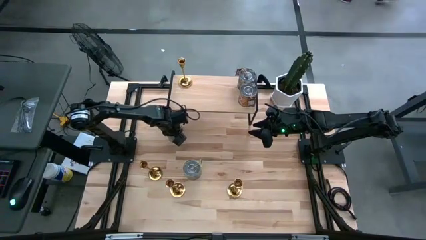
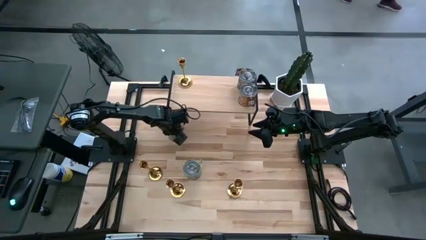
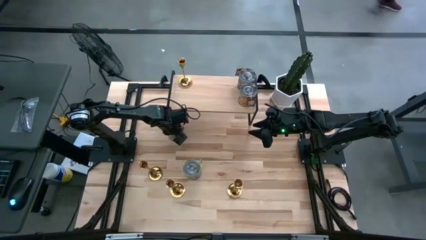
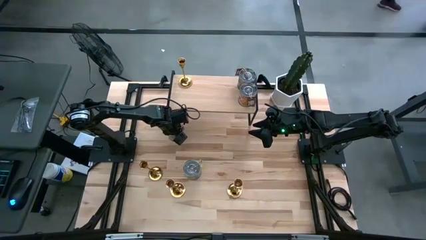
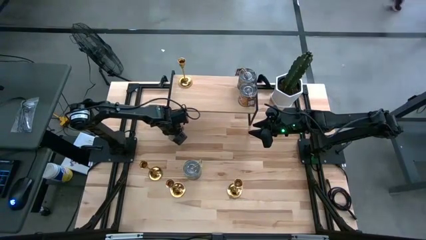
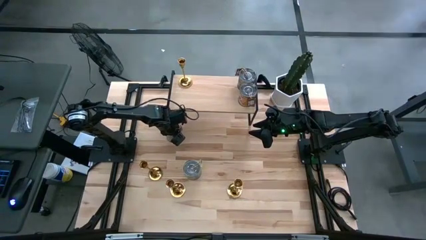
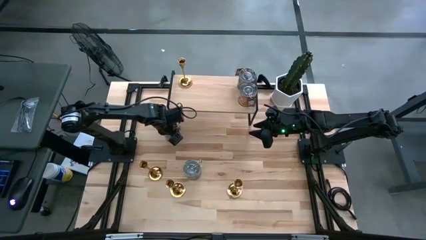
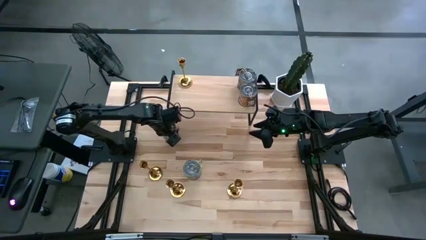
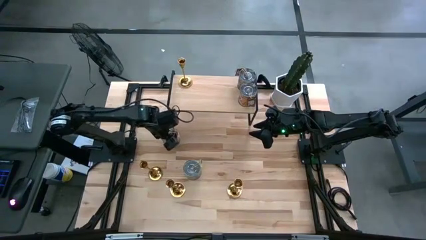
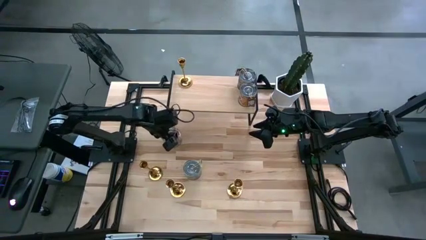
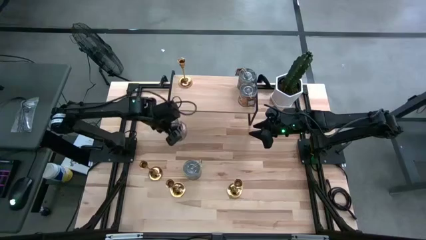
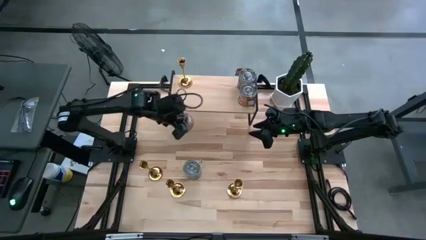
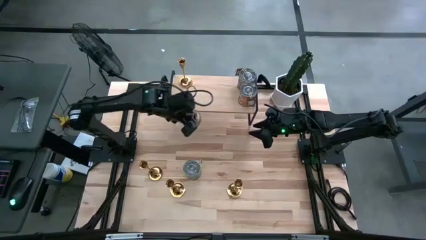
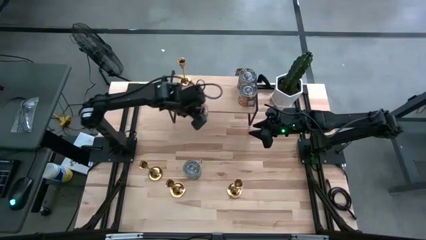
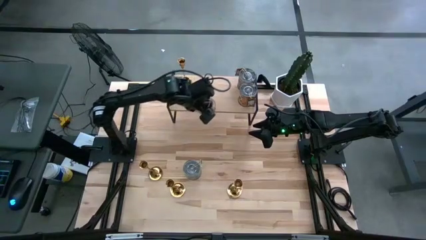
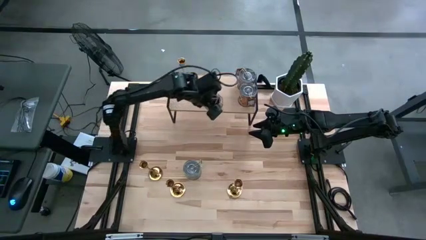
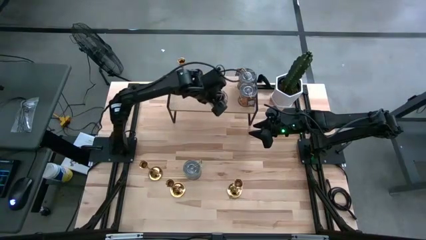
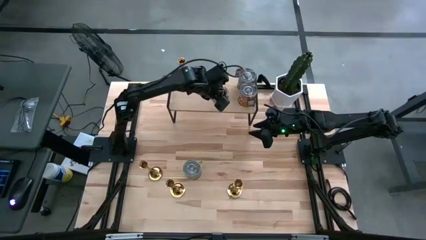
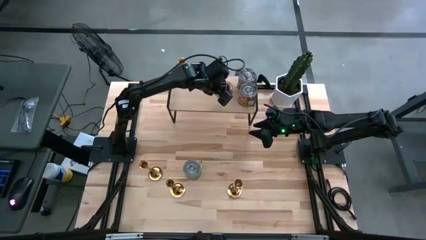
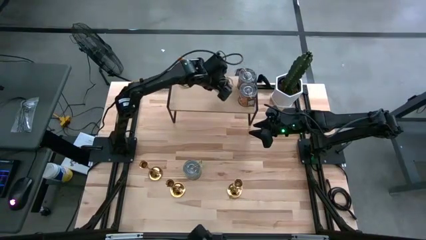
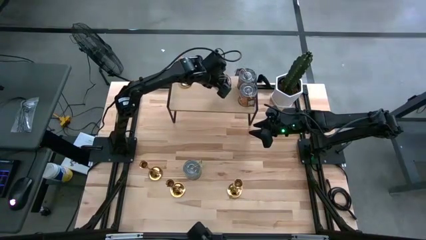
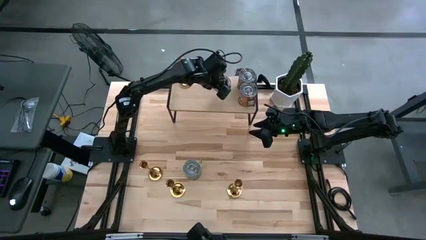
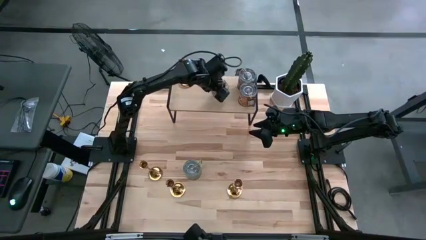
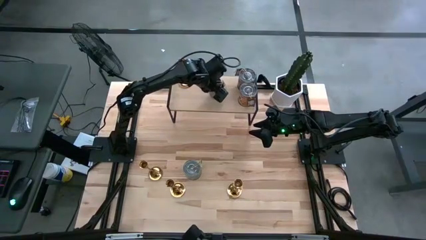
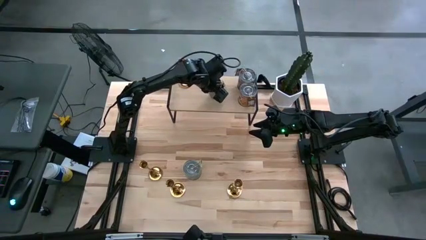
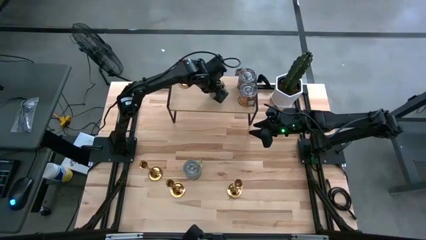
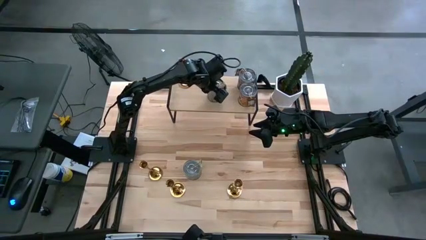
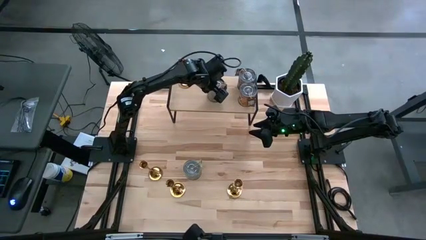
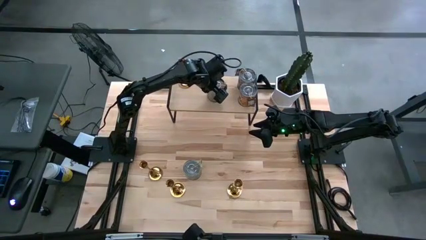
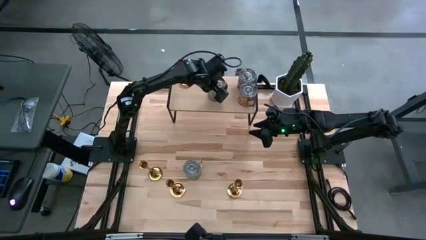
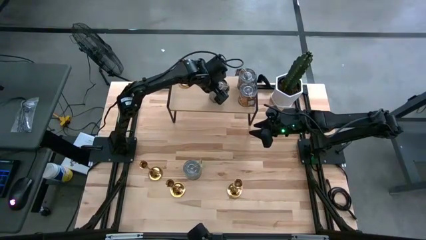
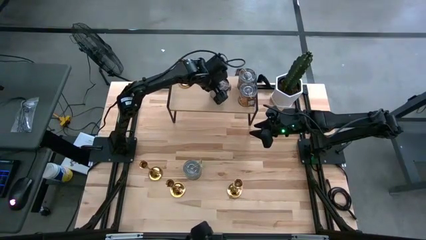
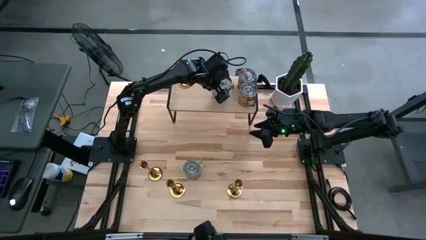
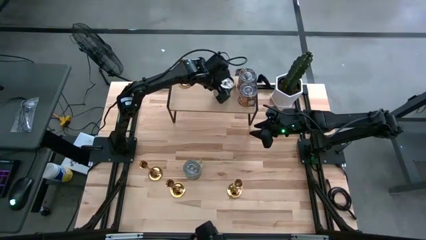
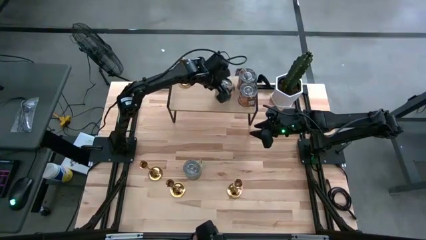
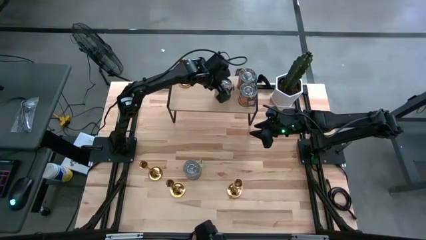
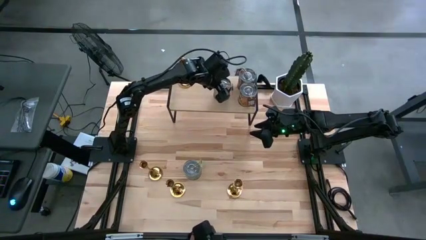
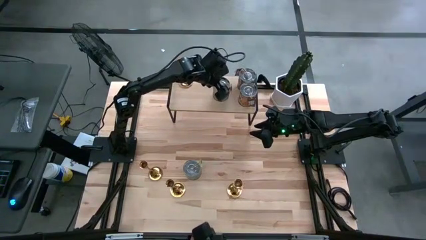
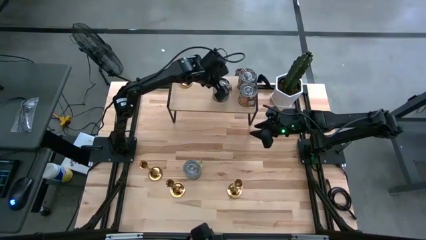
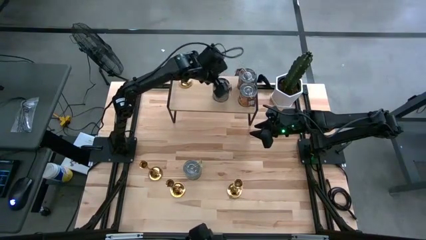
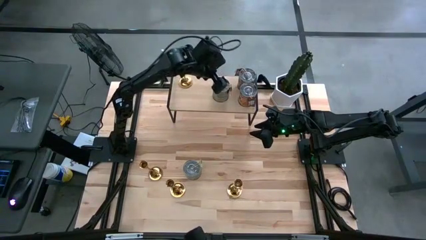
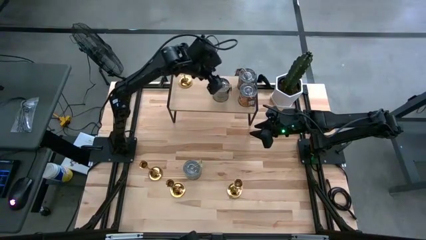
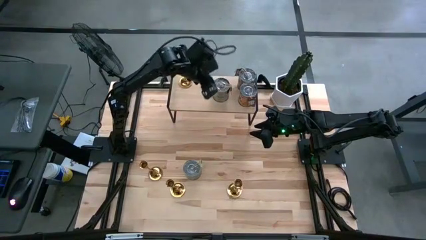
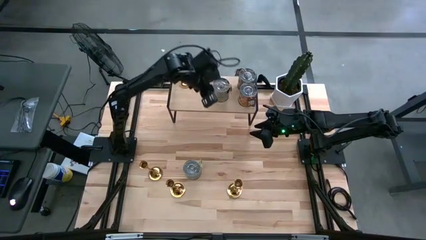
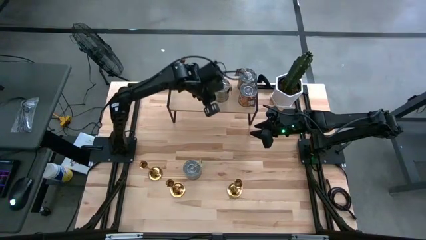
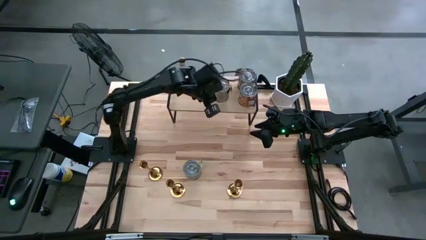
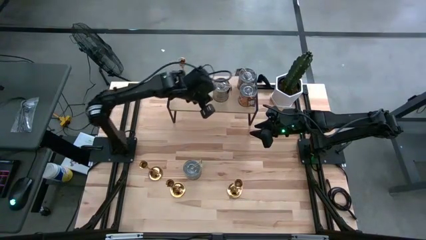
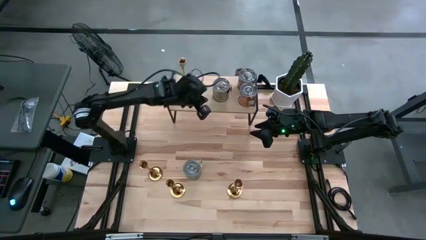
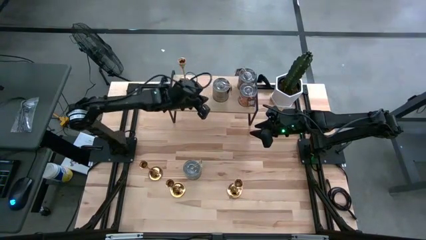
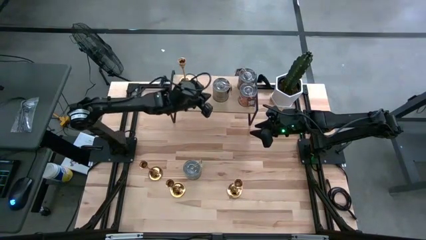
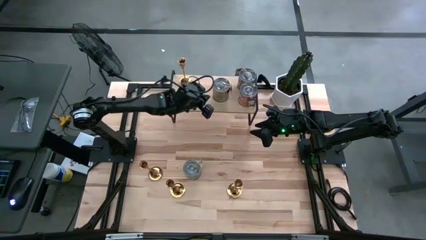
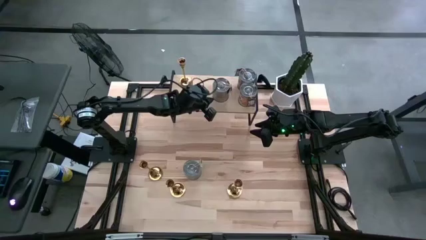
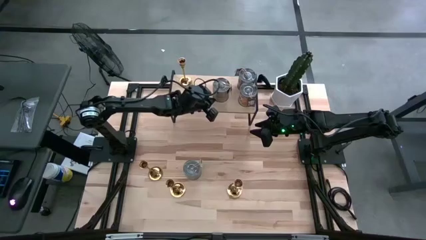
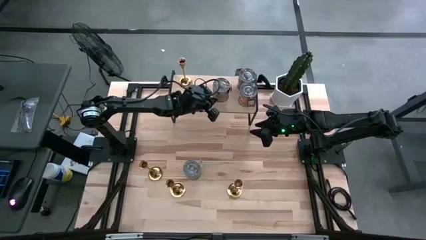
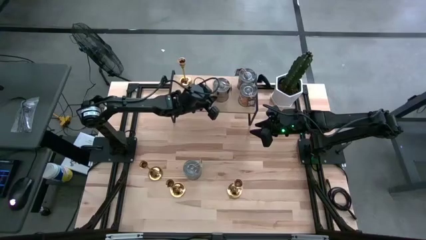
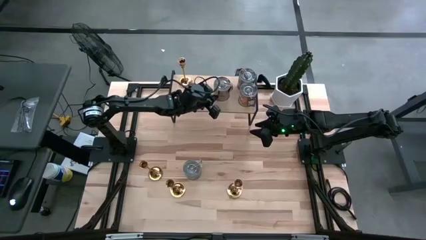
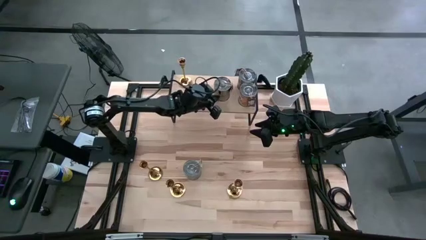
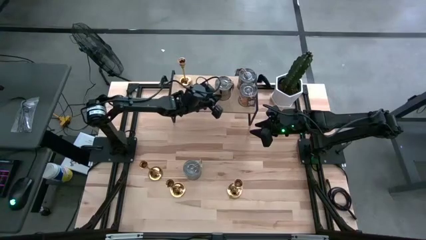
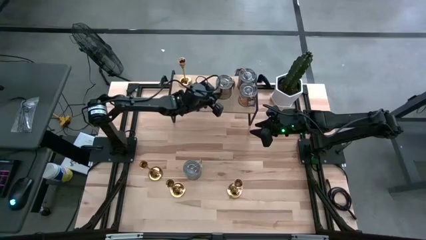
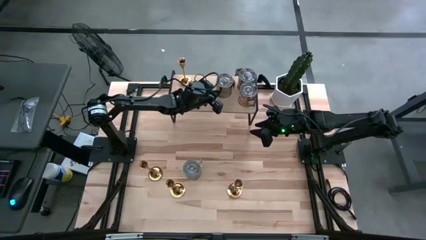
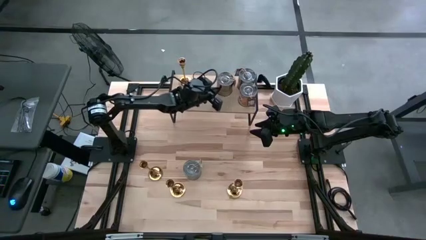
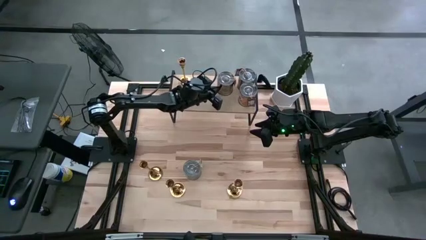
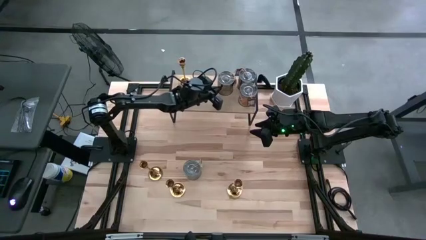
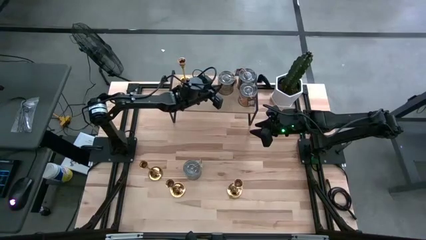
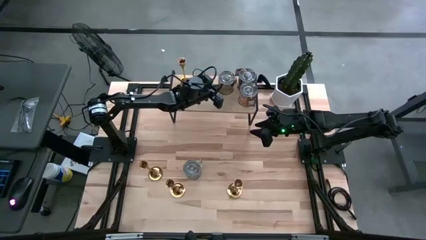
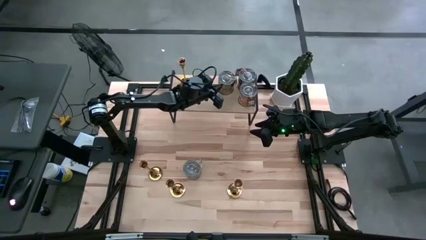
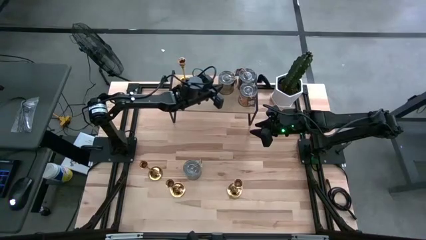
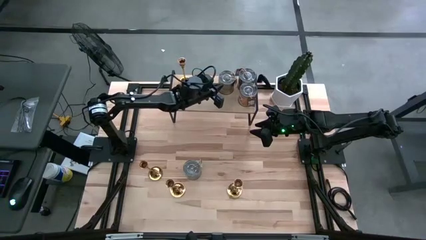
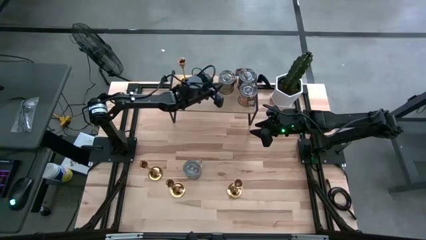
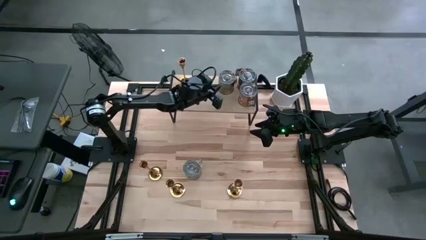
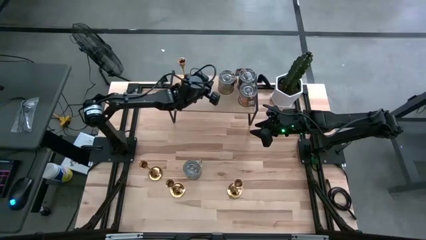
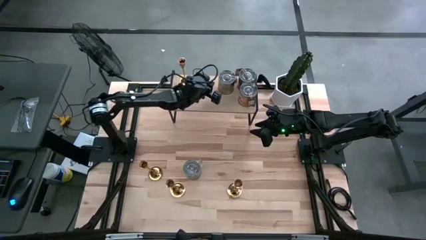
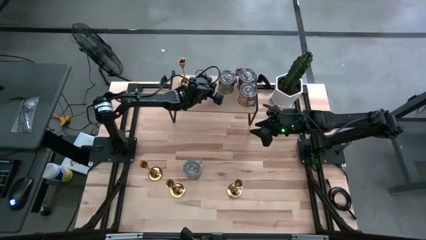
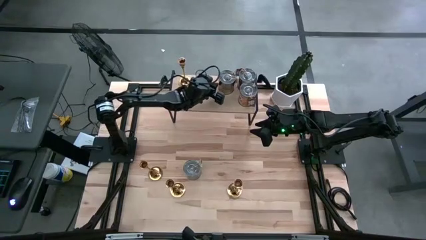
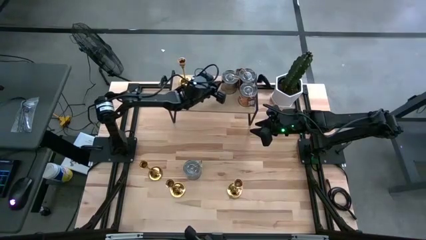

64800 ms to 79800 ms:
Task: Pick & Place candle stick holders
Put the silver scented candle on the shelf
